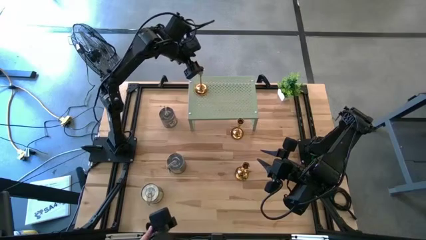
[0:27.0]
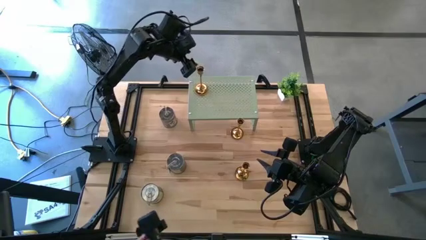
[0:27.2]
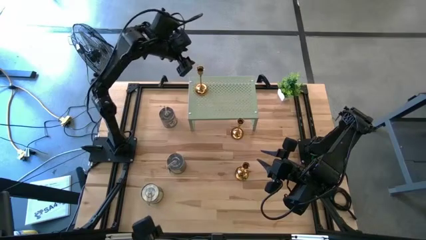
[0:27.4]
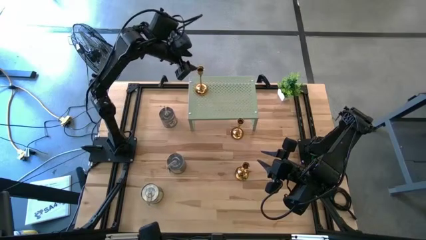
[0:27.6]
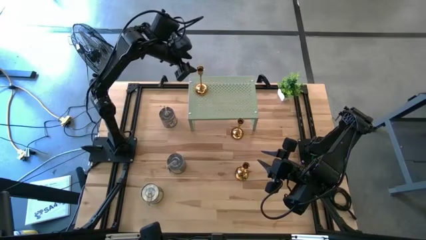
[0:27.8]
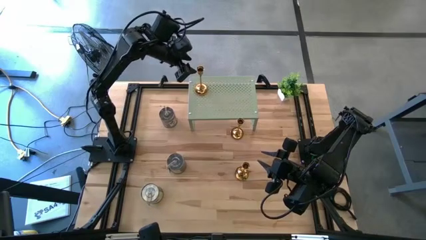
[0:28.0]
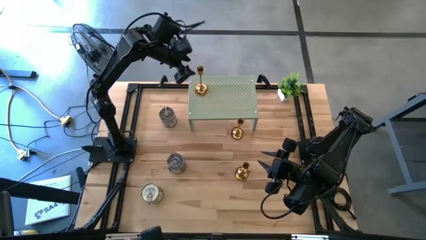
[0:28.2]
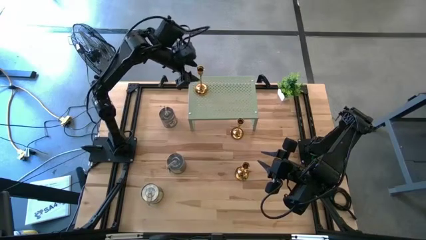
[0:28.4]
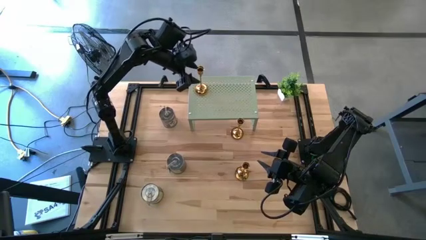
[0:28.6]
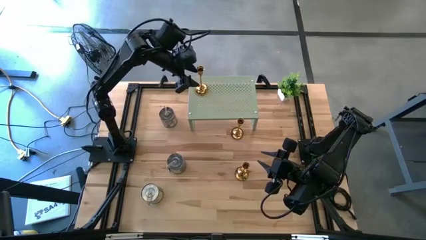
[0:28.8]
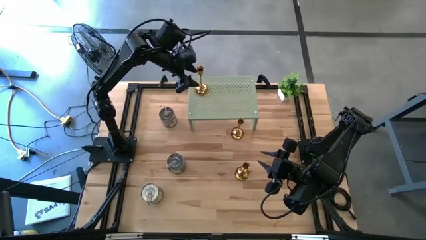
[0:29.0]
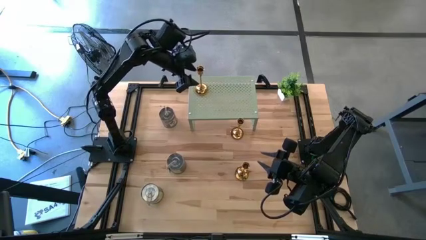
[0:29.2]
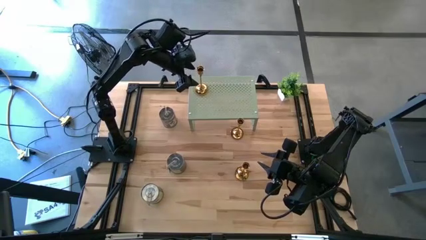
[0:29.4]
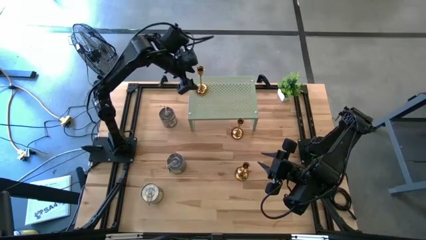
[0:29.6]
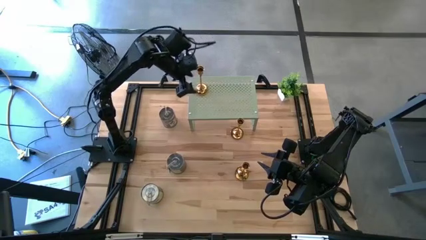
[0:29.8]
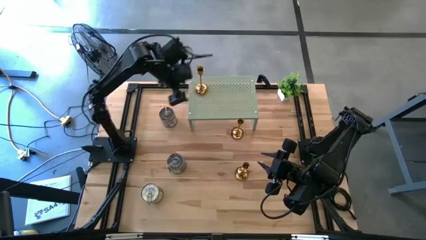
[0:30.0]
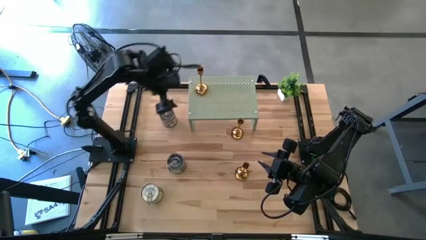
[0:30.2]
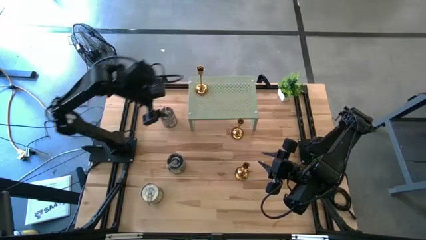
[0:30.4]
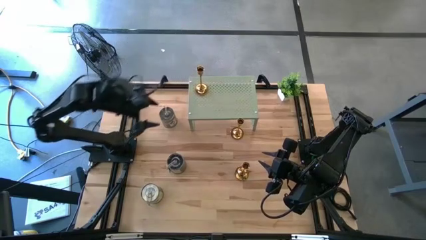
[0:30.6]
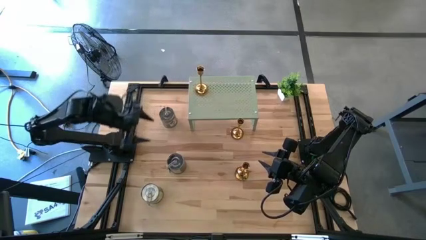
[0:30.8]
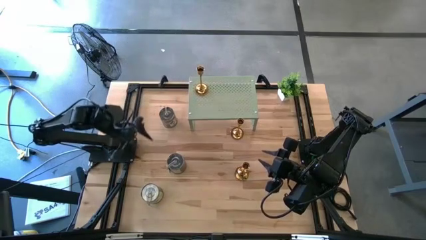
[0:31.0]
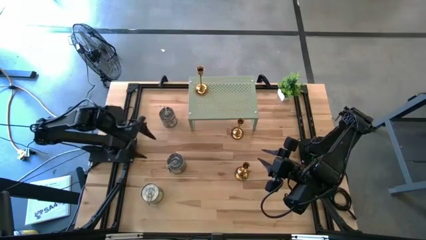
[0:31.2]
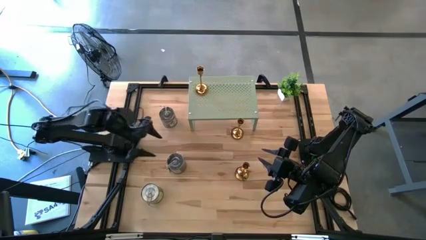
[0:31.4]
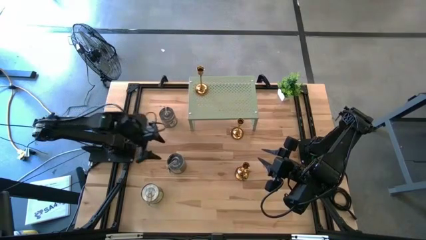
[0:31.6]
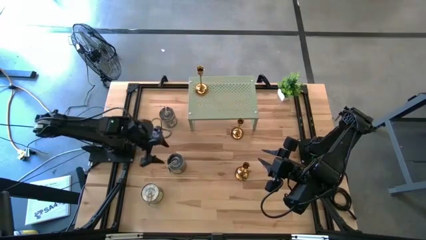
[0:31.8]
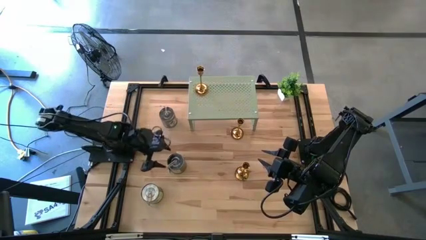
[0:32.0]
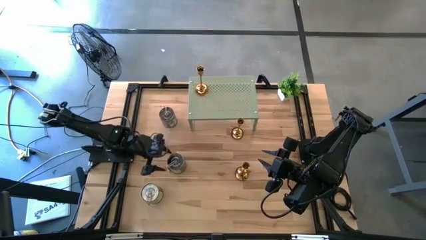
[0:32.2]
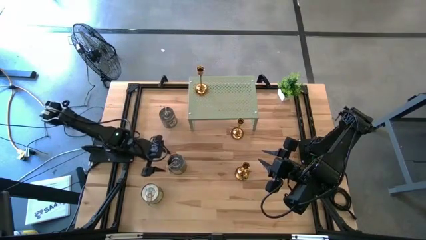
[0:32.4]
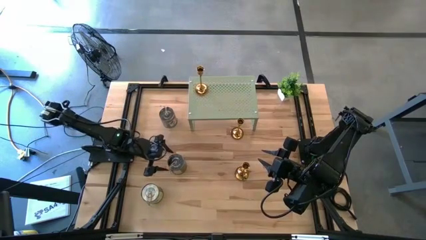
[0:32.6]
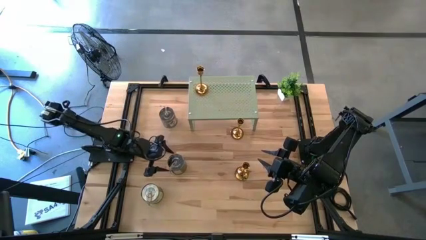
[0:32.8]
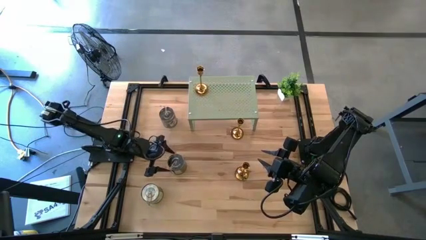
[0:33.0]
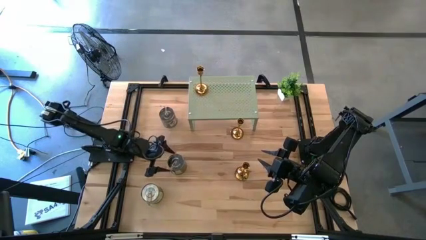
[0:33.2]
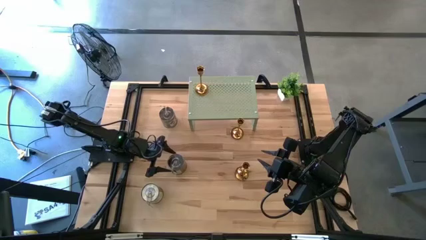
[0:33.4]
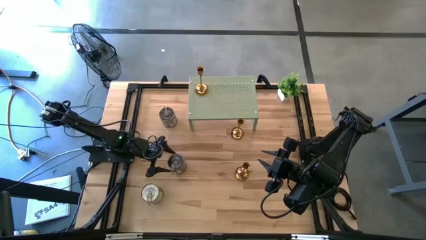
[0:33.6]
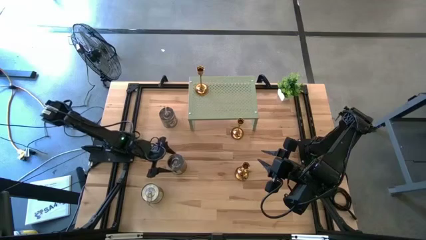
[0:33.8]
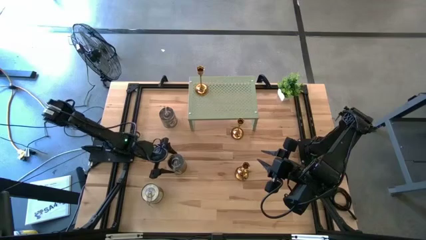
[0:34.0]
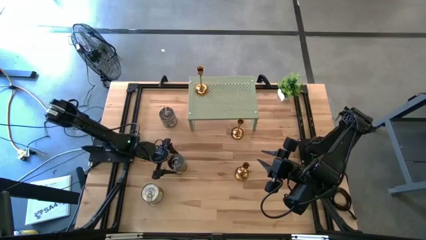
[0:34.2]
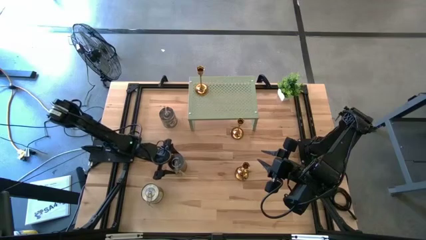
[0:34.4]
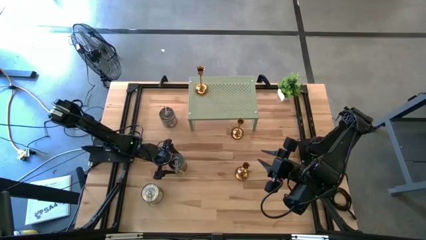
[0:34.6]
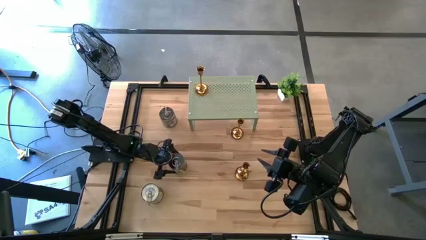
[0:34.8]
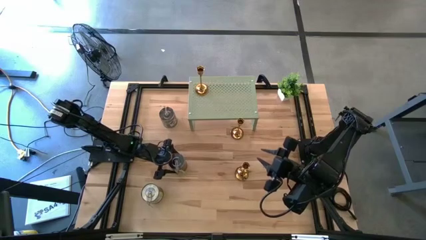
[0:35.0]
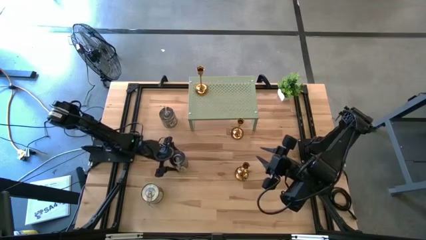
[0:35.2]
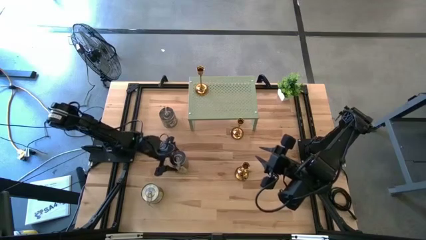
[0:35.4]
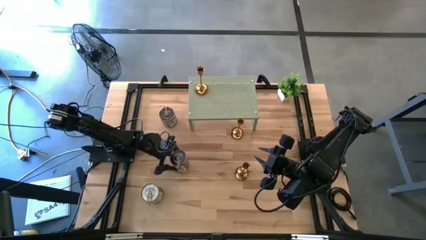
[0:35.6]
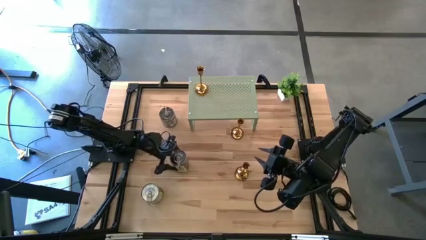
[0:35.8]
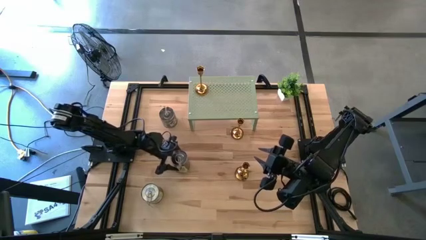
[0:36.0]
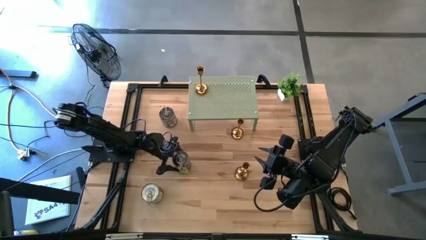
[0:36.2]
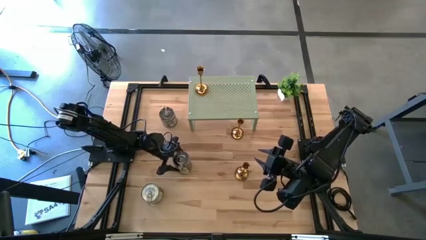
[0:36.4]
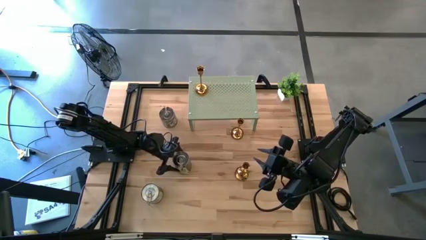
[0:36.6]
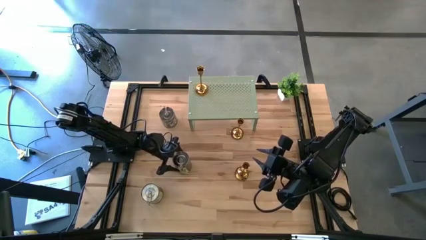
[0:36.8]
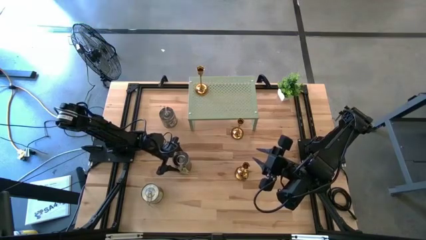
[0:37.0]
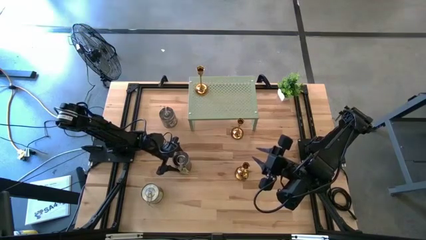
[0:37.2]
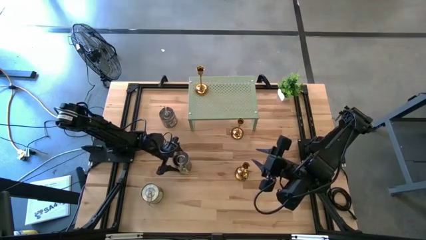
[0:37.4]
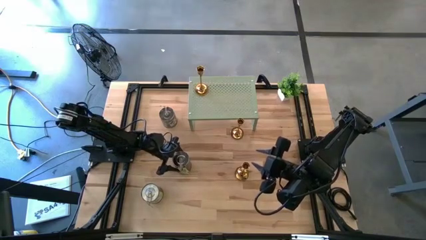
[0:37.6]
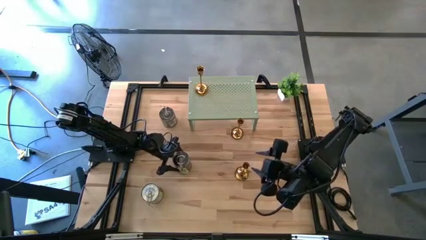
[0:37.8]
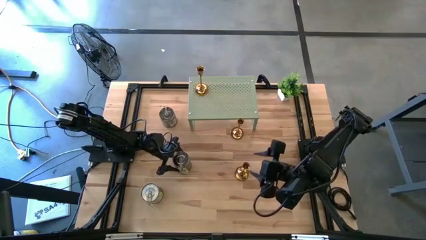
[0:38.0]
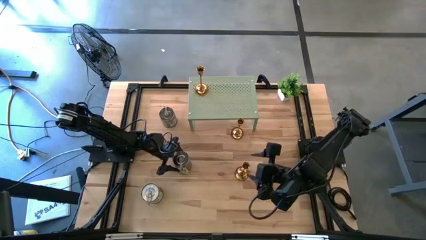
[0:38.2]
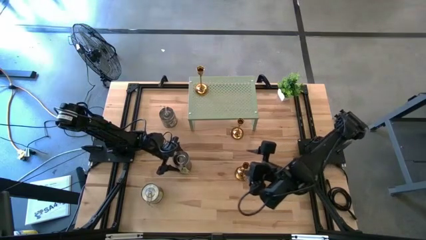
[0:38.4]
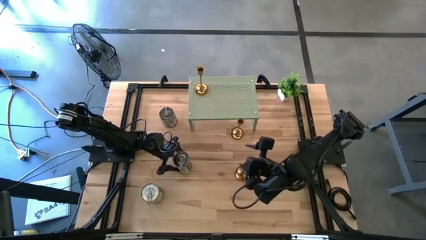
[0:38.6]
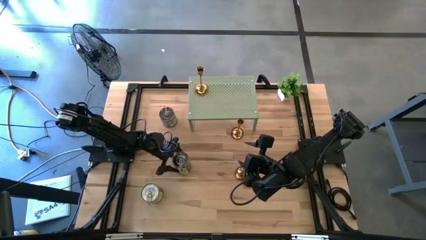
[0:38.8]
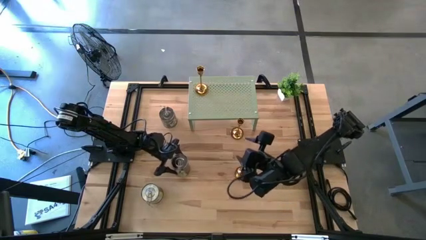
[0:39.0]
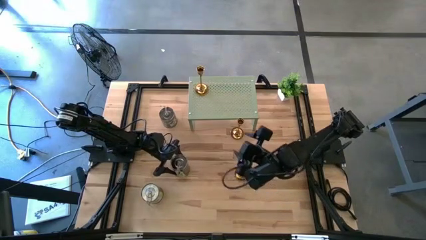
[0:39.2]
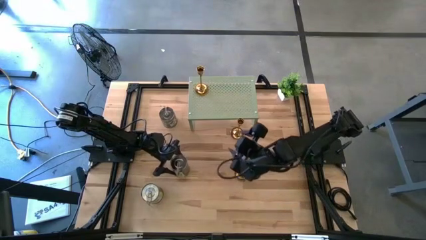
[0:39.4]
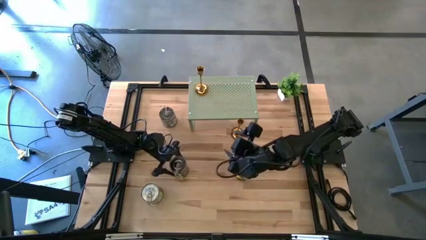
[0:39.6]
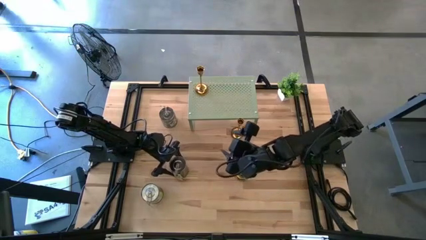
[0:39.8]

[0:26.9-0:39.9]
Task: Pick & Place candle stick holders
Put the middle right silver scented candle on the shelf

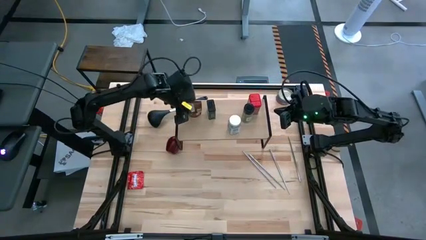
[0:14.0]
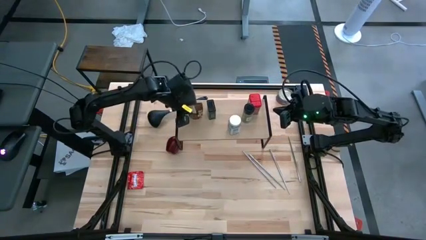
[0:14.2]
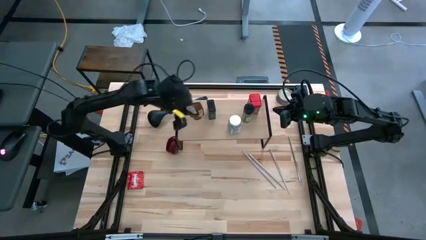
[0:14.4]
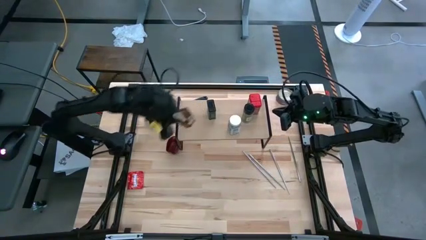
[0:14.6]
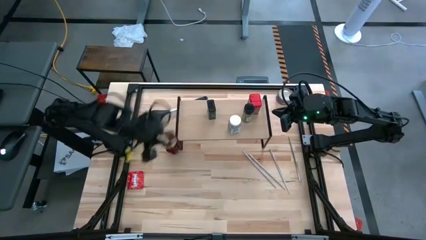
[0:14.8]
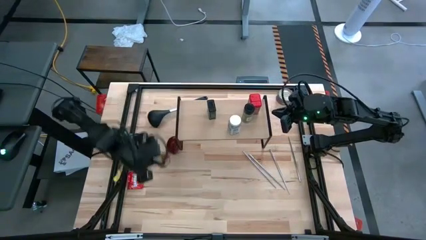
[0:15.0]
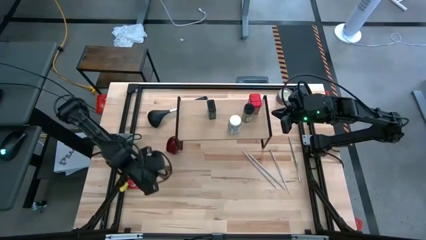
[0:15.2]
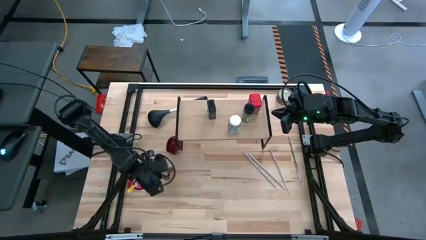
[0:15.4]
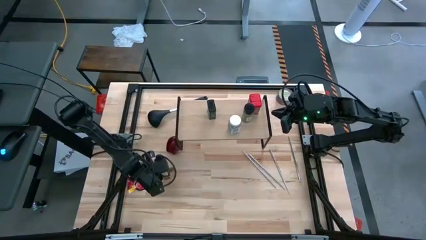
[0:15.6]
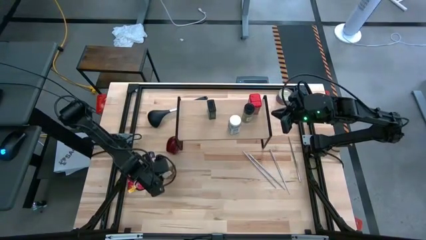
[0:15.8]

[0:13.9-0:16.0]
Task: Shelf spices
Remove a brown seasoning pack from the shelf

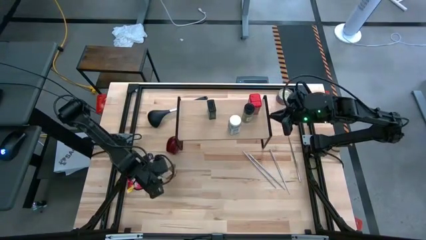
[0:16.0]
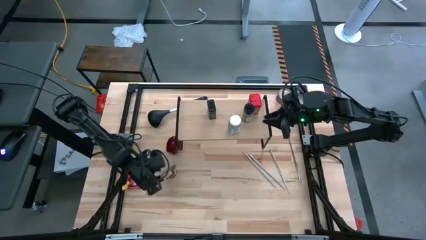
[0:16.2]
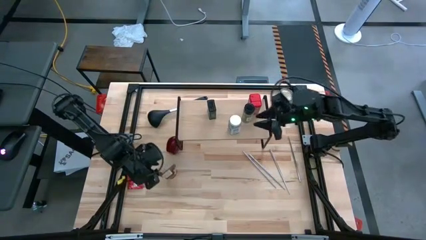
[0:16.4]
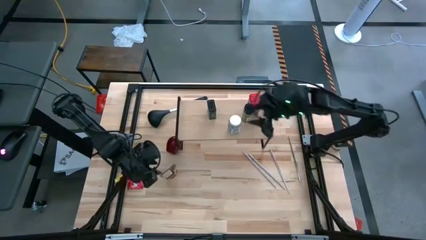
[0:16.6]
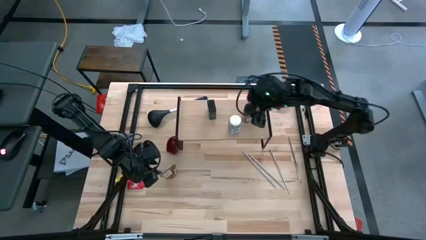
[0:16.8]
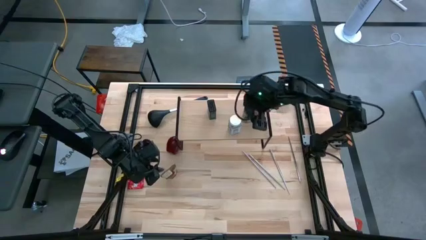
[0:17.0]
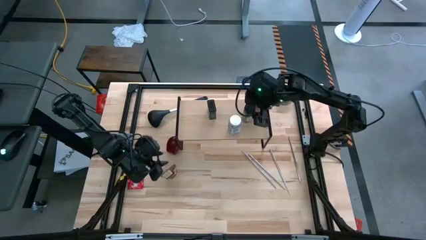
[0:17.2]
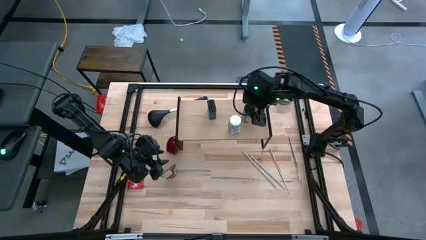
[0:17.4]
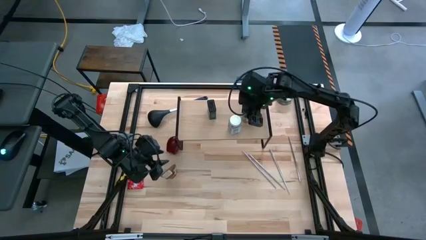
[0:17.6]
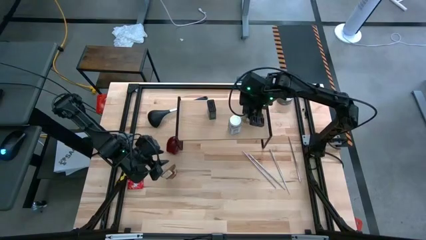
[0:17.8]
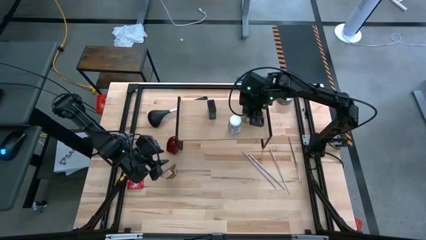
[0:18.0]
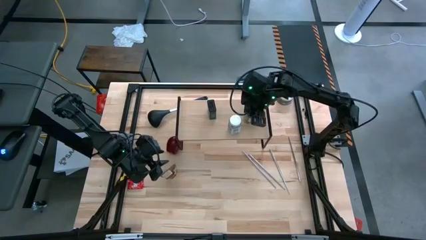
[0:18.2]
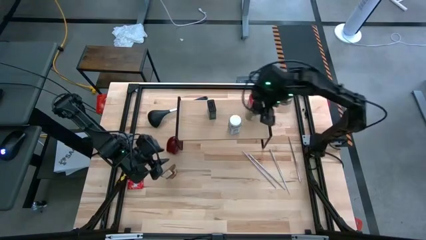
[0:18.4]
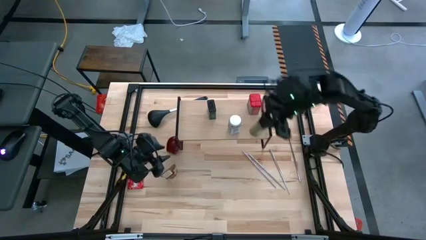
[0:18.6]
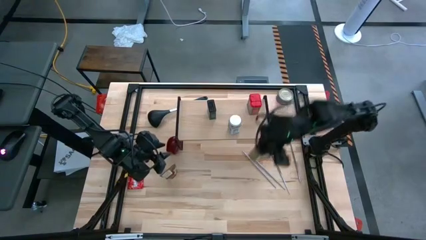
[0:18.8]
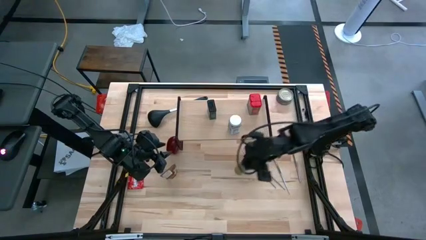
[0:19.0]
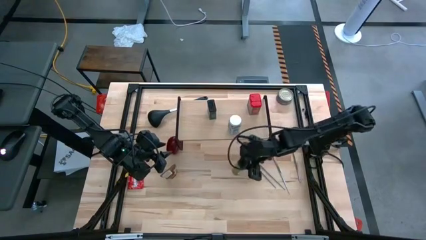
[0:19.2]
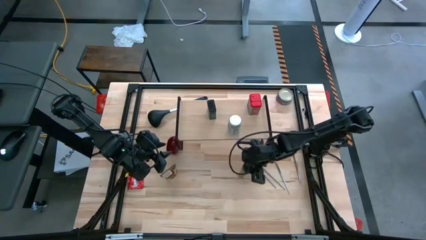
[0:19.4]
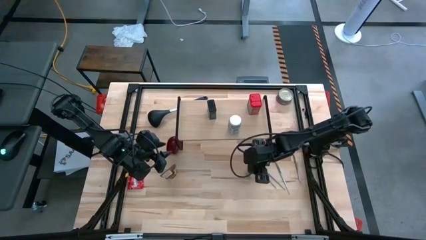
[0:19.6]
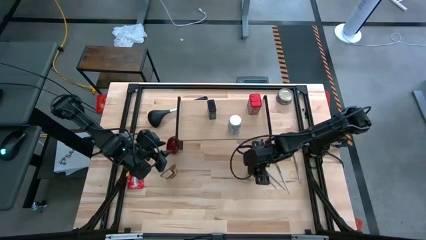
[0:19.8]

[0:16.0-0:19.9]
Remove the black seasoning bottle from the shelf
